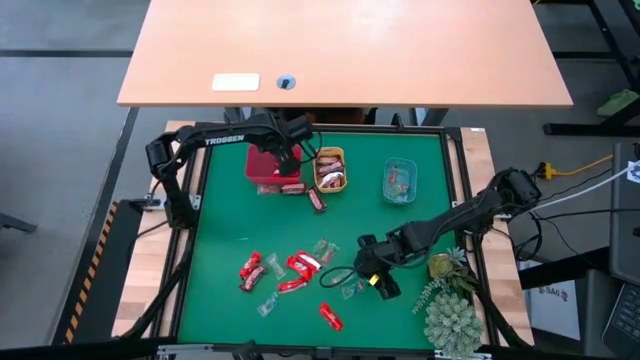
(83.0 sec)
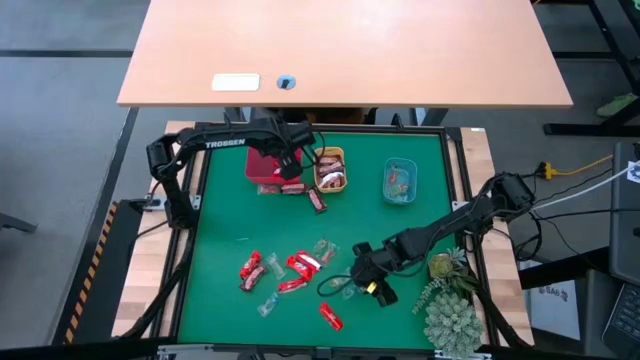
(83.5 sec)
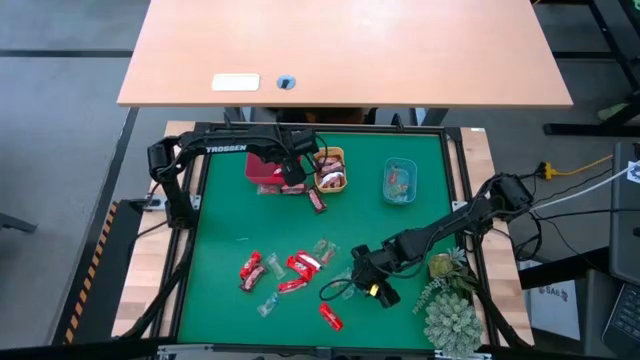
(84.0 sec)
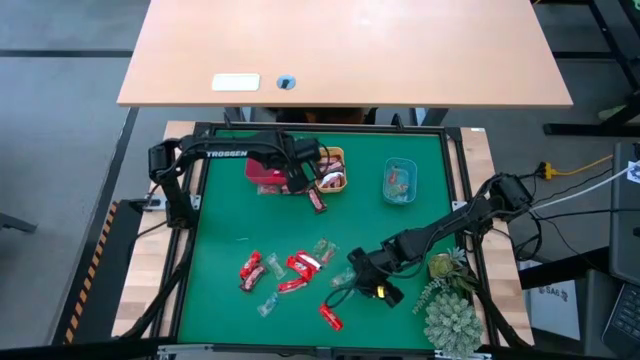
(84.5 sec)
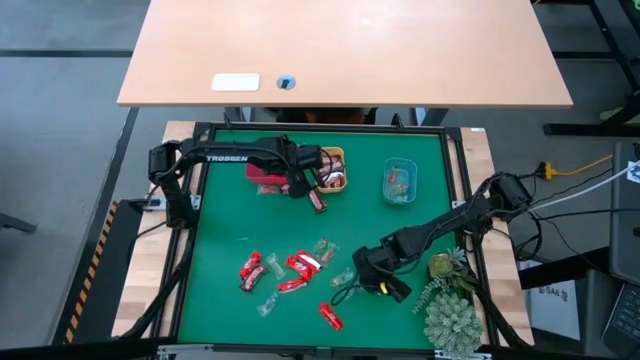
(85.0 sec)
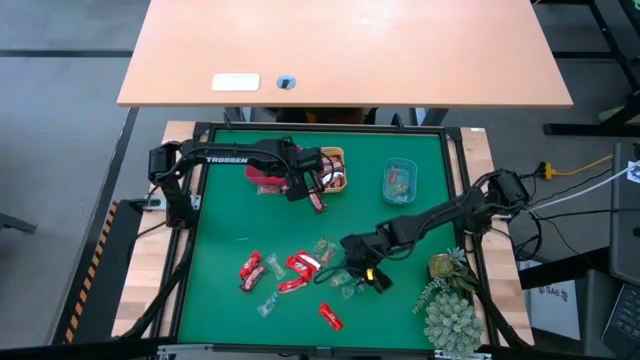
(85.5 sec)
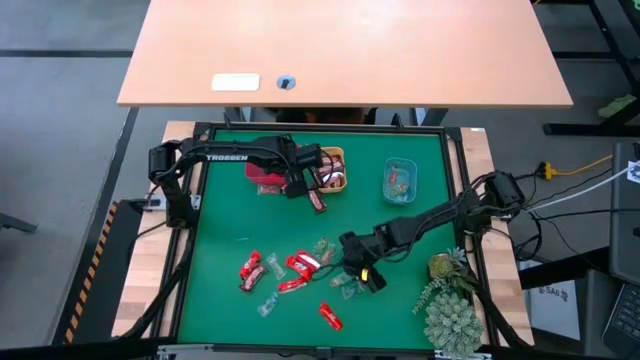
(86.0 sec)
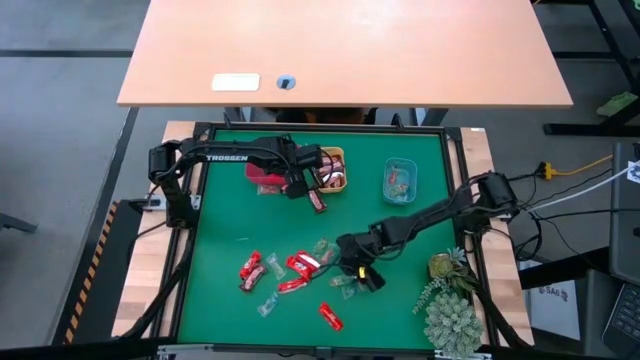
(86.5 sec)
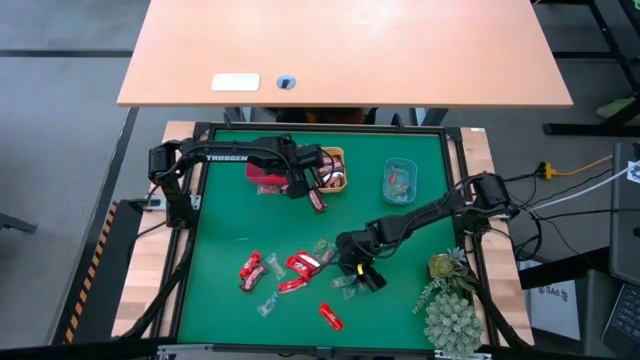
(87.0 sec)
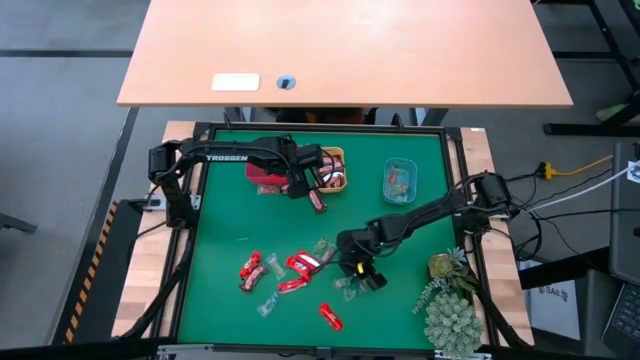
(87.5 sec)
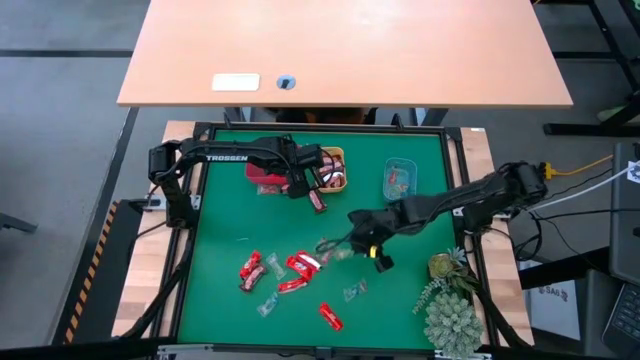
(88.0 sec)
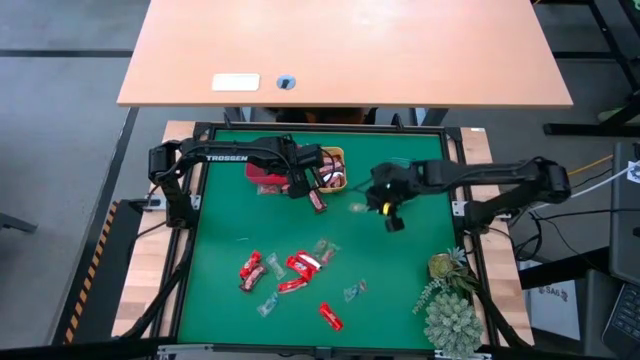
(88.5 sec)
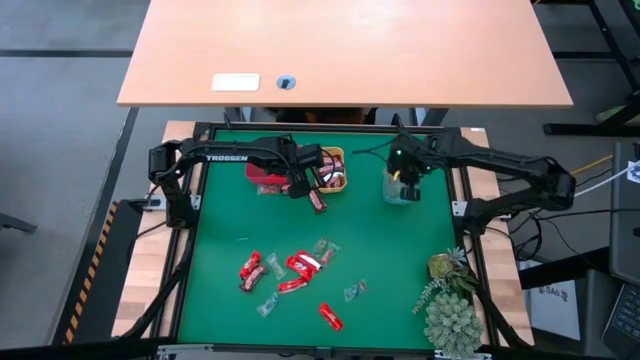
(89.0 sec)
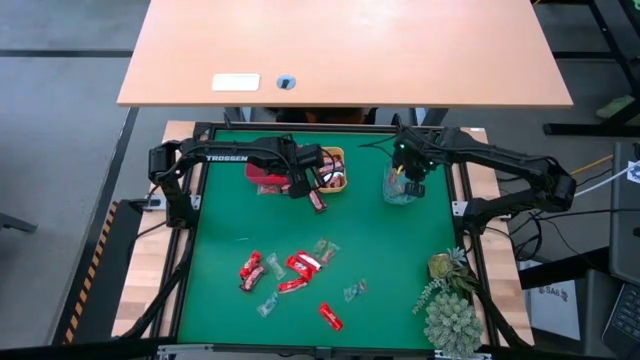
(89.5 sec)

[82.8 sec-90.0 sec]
Task: Sort candy
Put the green gummy into the blue bin

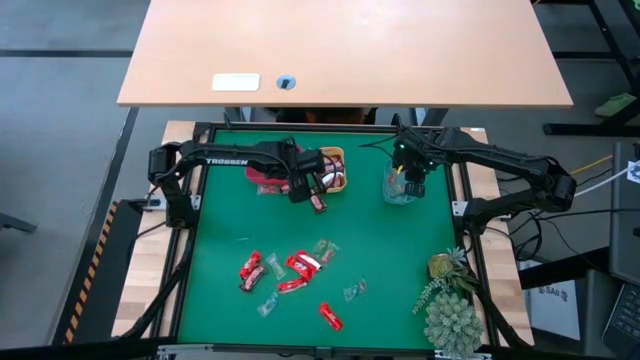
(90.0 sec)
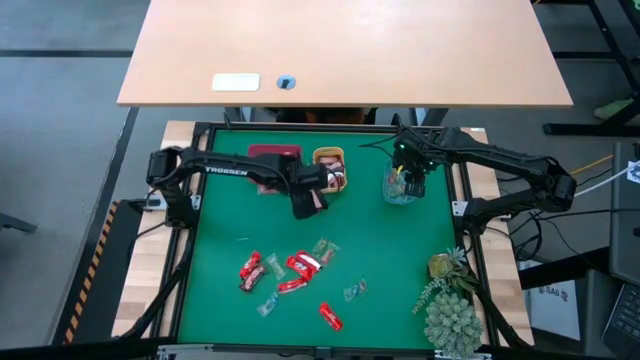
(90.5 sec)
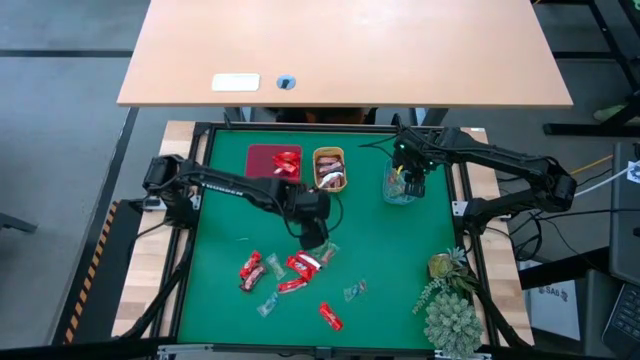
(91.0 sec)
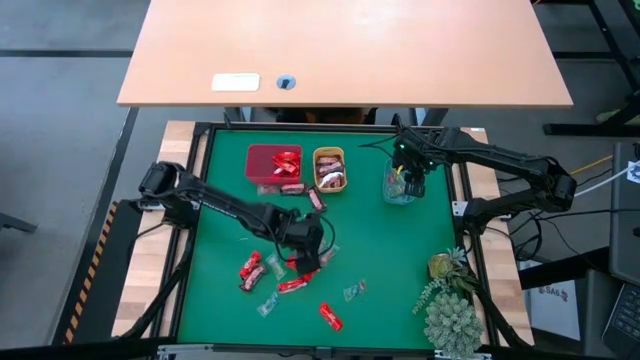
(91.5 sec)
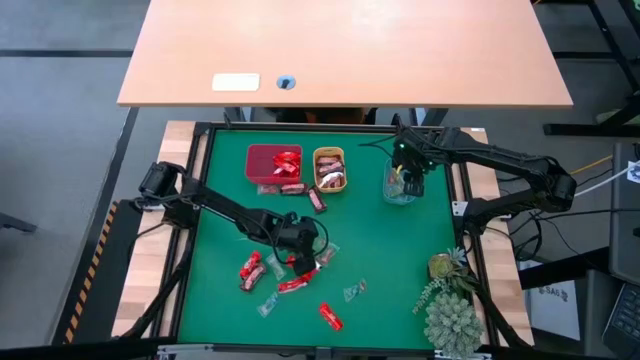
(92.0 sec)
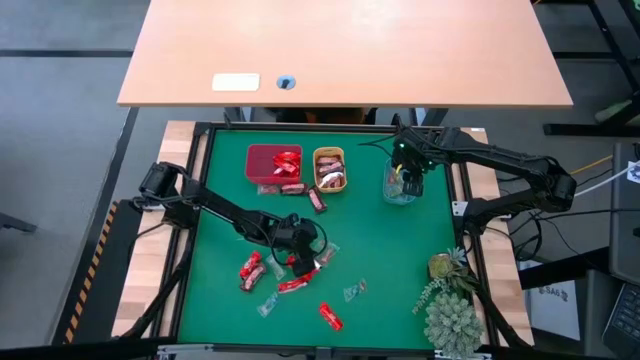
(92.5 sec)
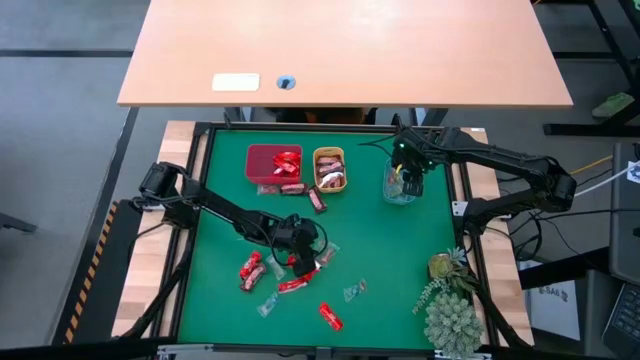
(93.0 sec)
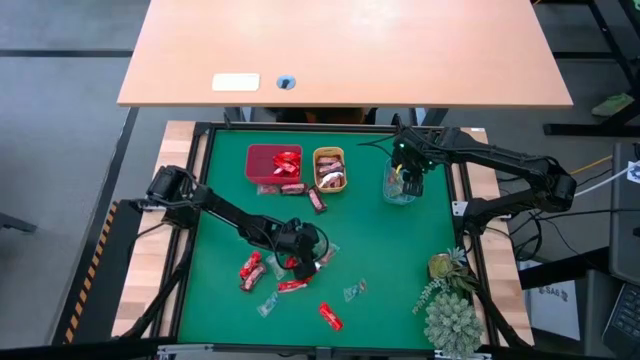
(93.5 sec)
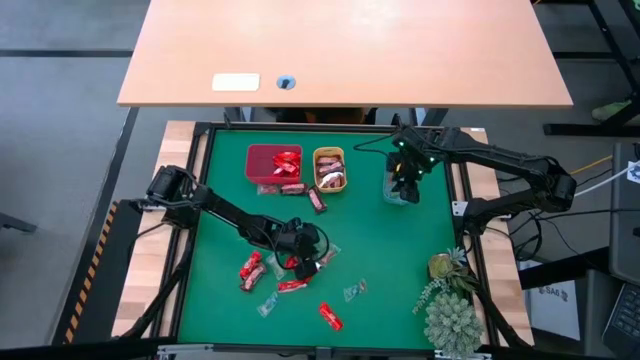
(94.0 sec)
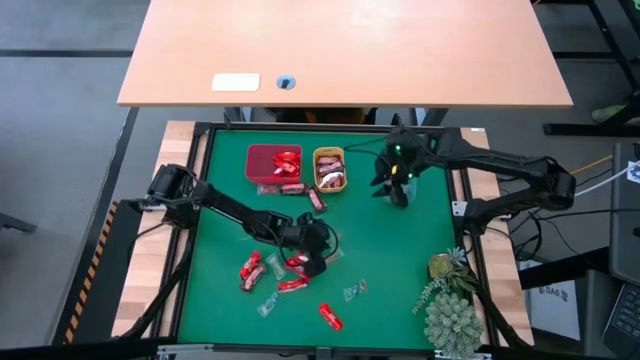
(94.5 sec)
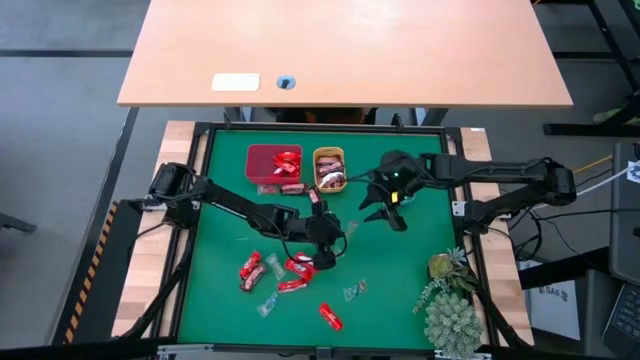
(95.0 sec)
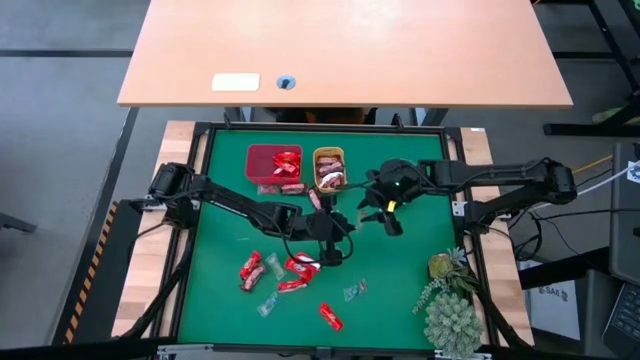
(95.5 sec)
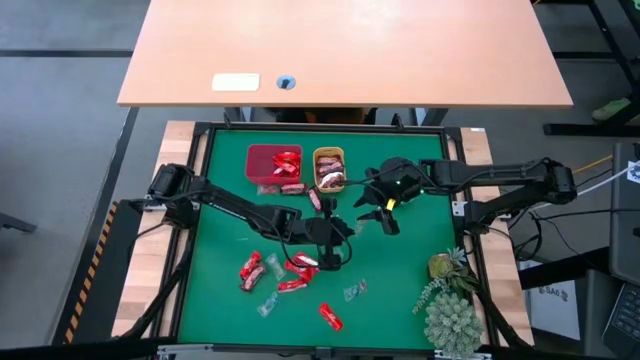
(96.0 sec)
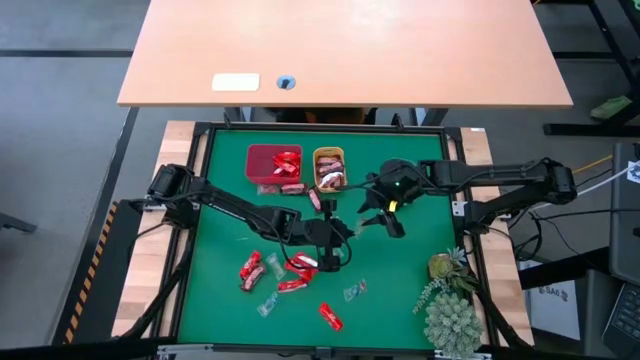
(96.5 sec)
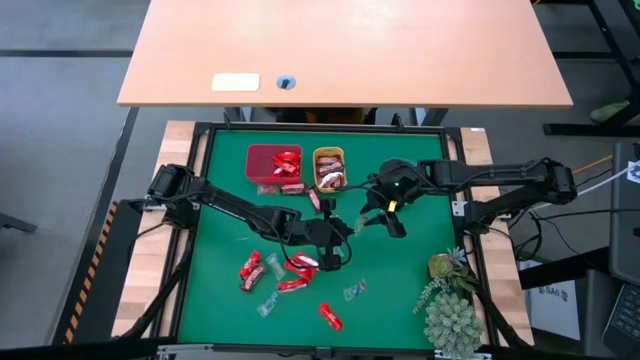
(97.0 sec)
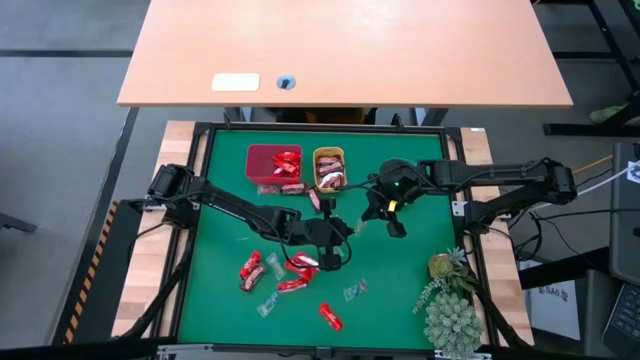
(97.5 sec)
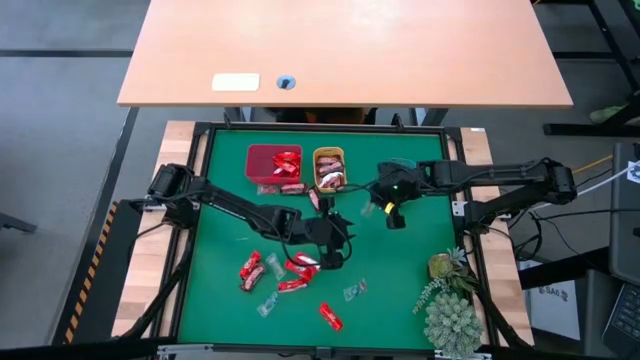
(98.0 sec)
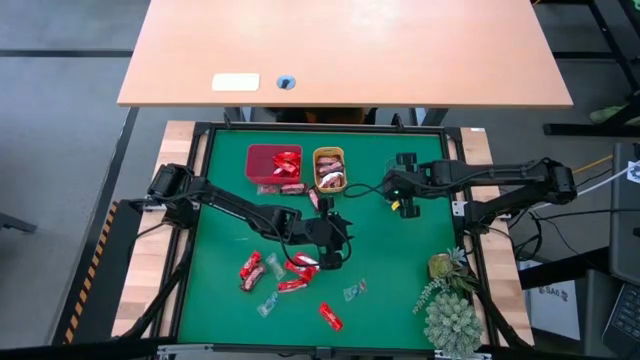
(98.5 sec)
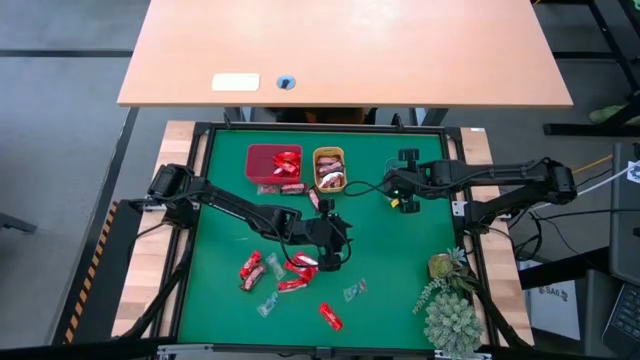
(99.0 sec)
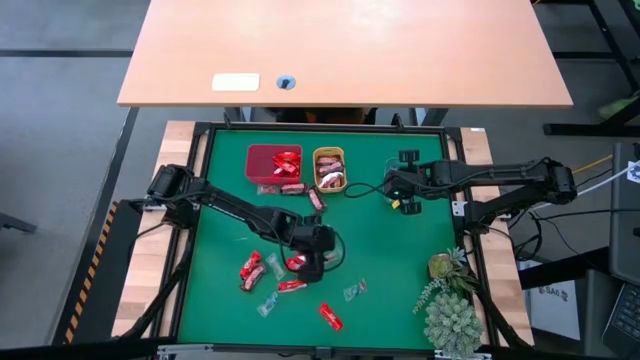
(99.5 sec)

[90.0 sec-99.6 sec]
Put the green gummy into the blue bin

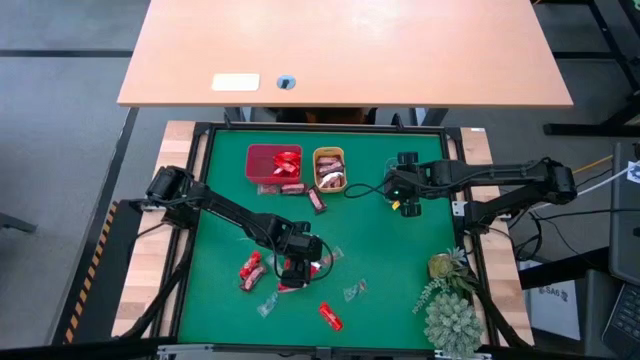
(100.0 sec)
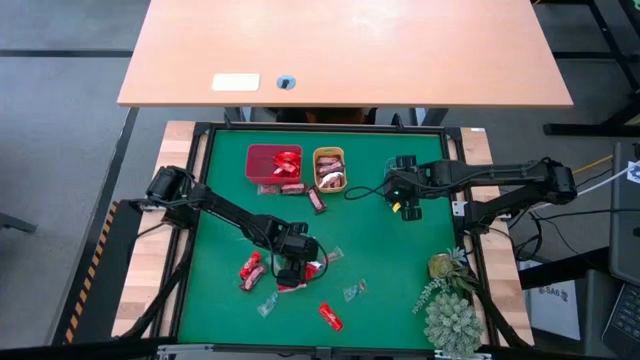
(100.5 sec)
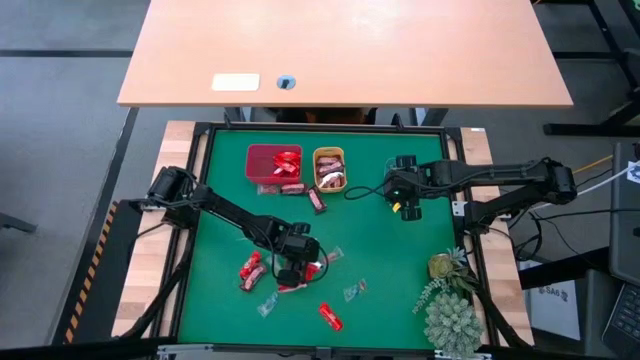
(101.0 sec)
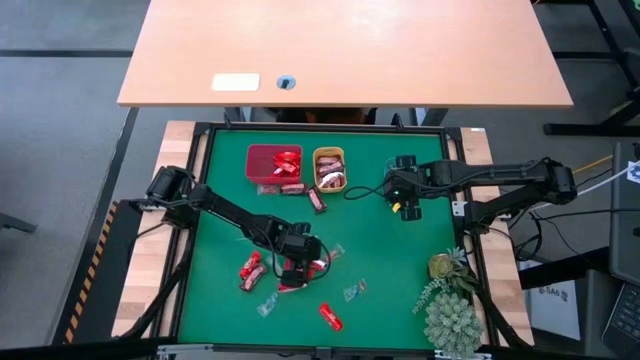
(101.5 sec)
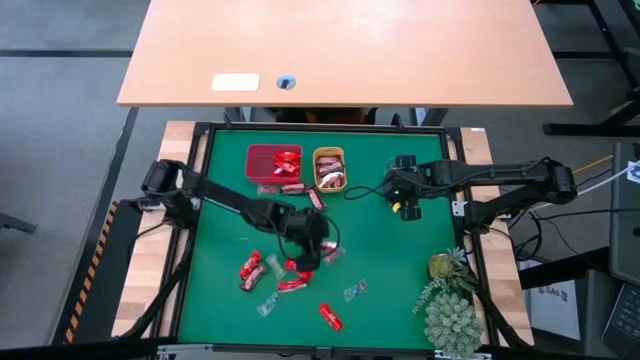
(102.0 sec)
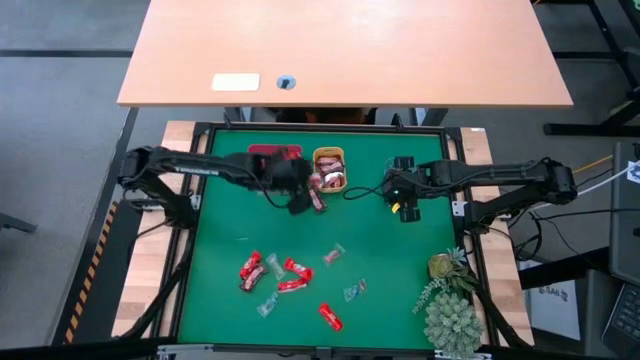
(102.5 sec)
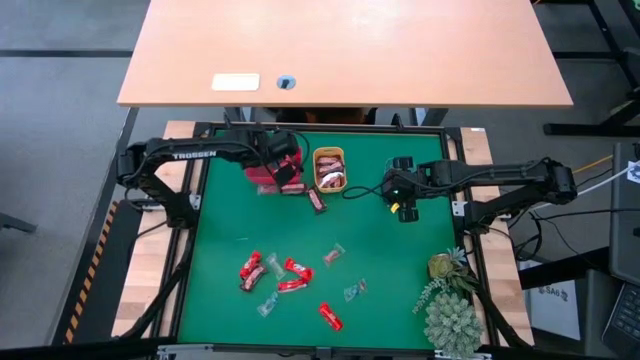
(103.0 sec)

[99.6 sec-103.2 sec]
Put the red chocolate bar into the red bin
